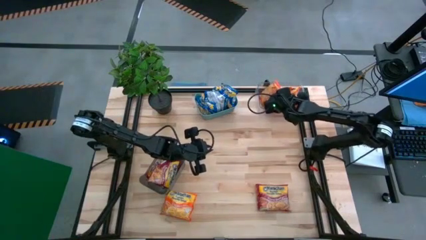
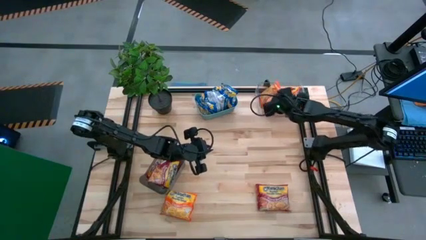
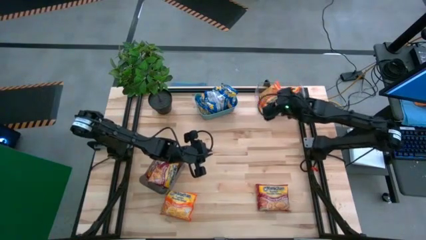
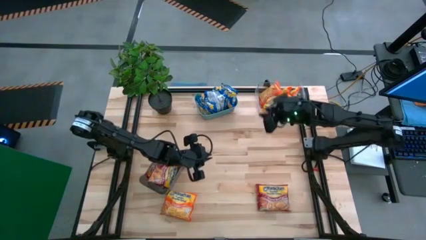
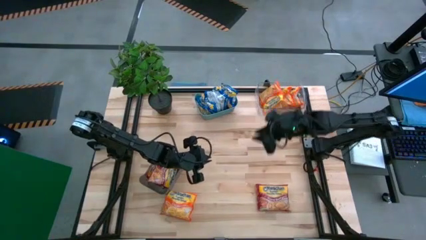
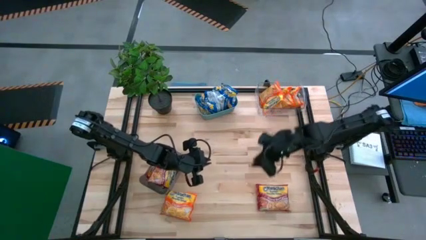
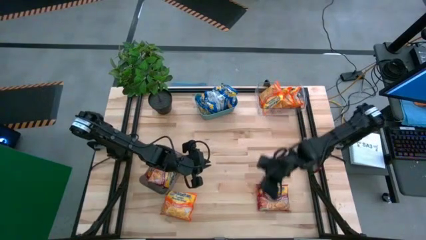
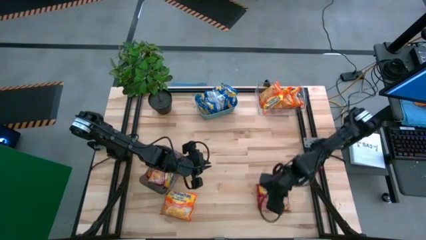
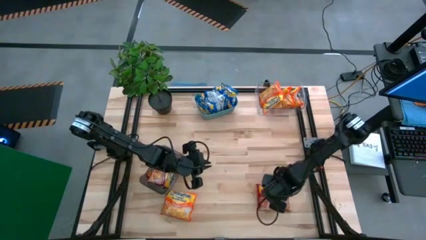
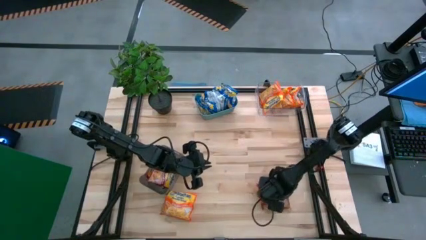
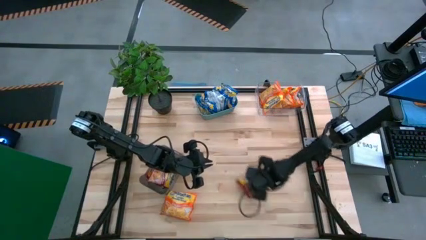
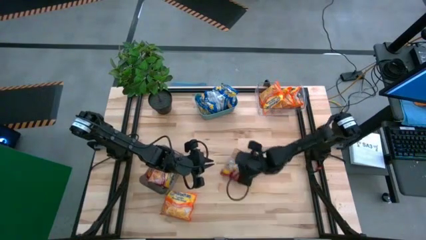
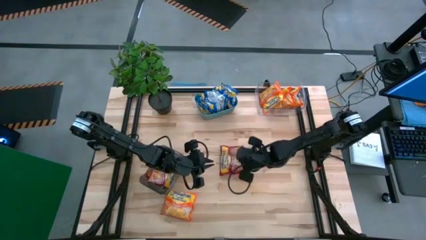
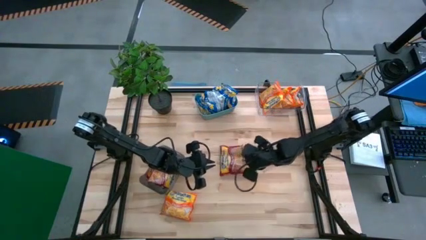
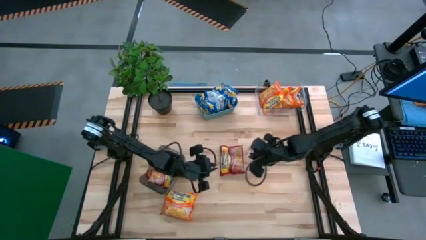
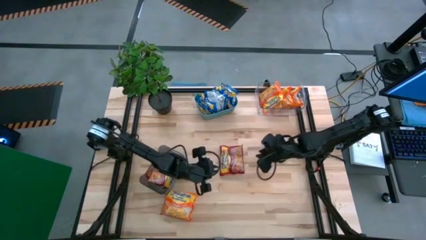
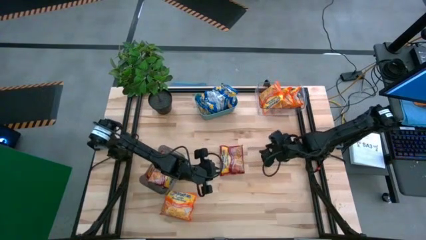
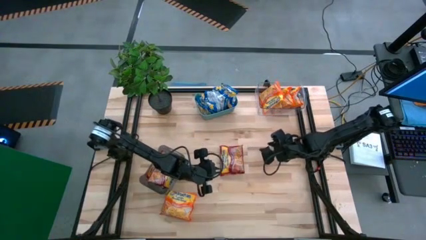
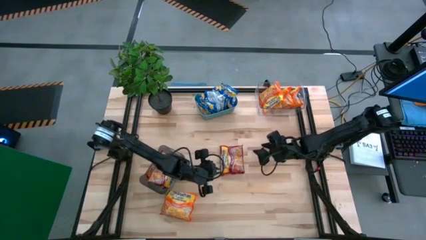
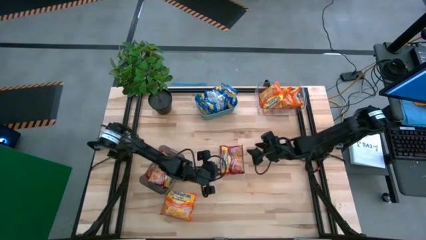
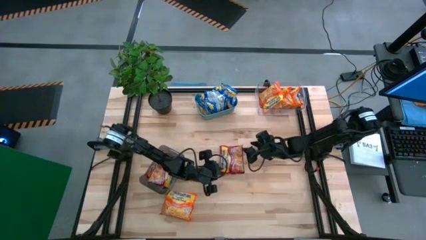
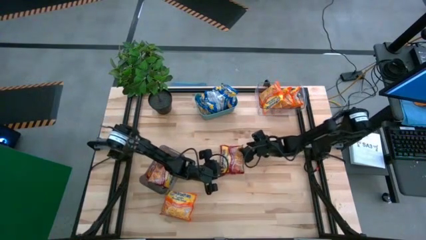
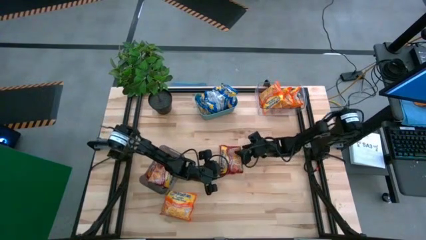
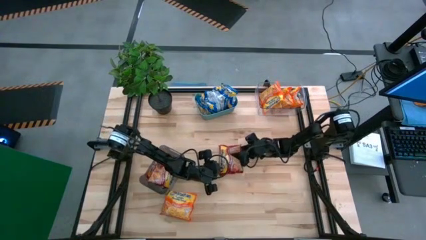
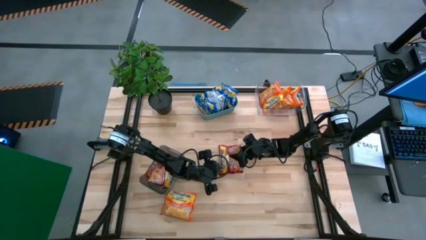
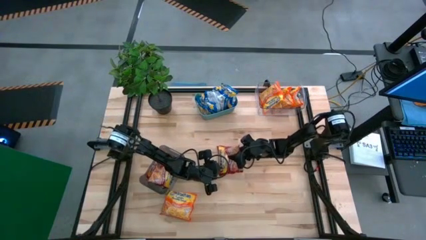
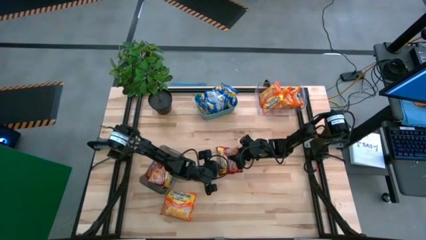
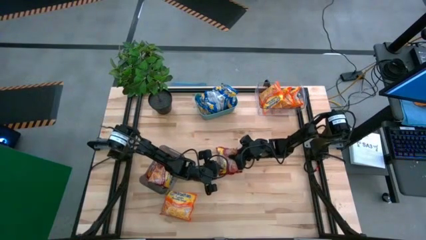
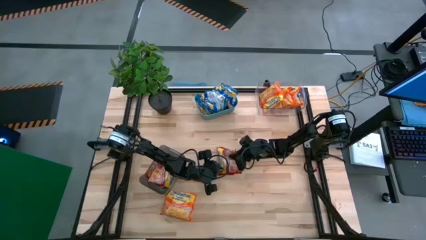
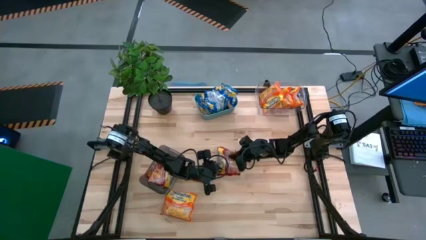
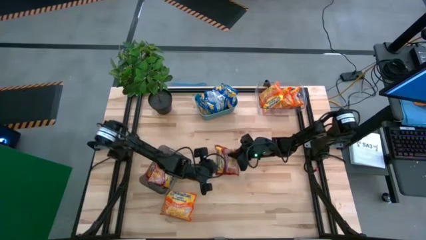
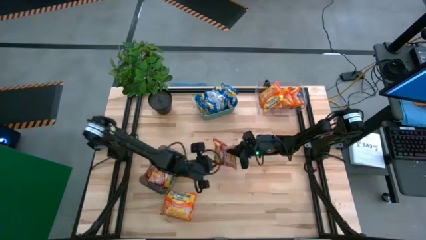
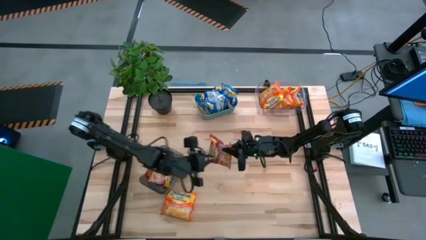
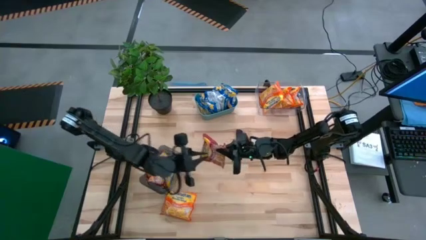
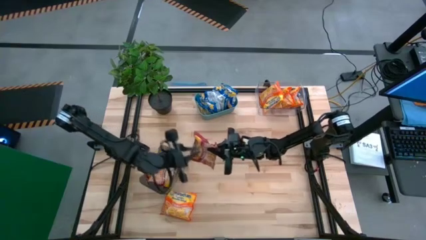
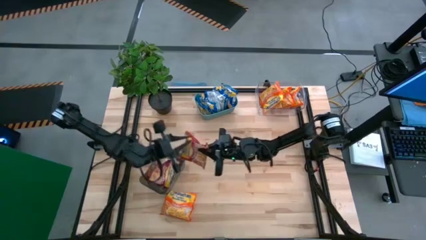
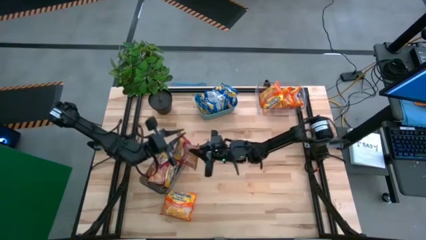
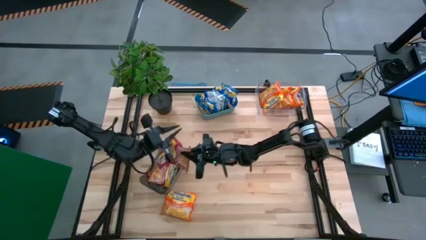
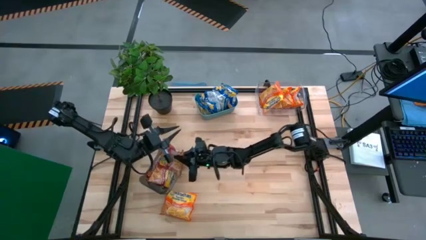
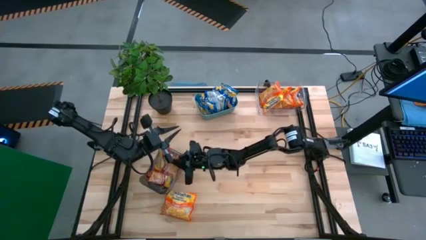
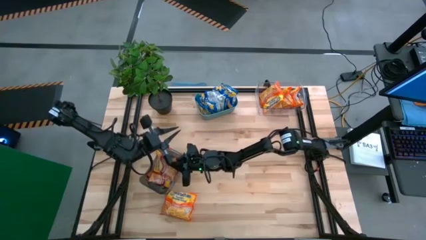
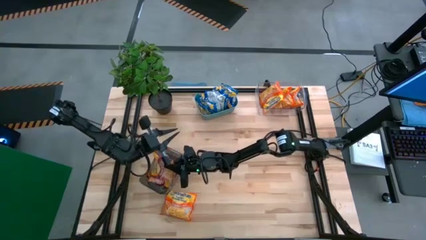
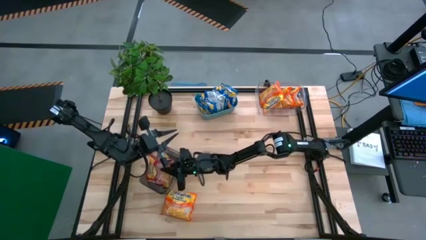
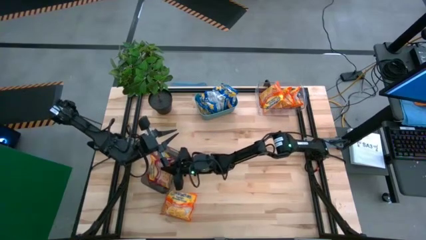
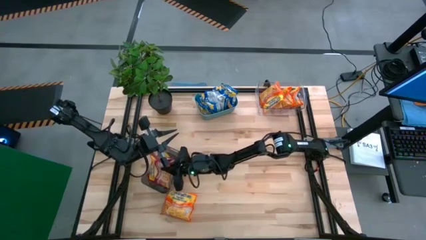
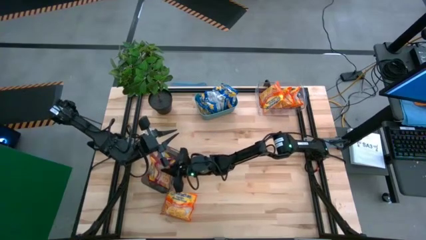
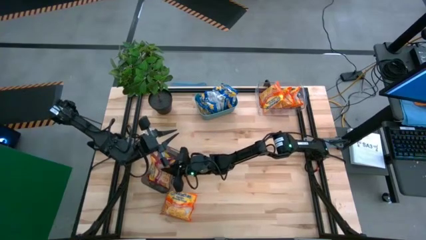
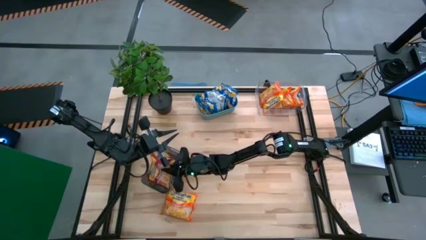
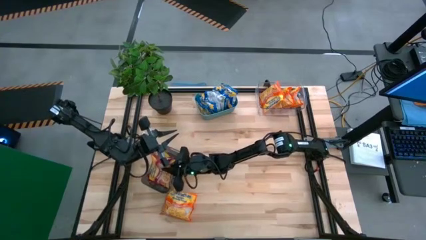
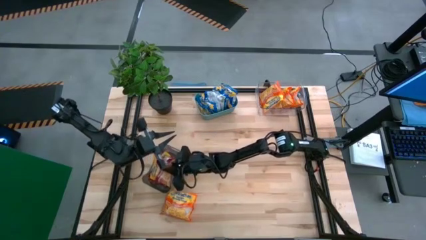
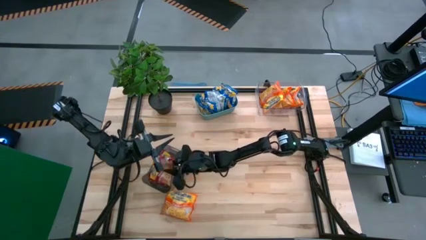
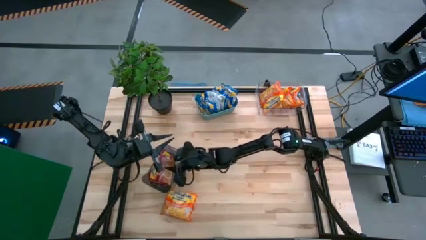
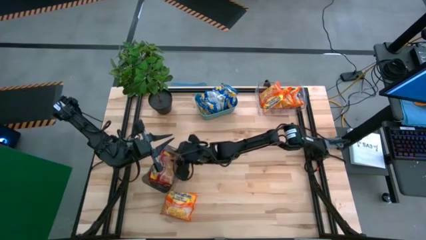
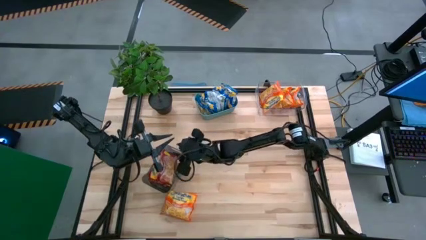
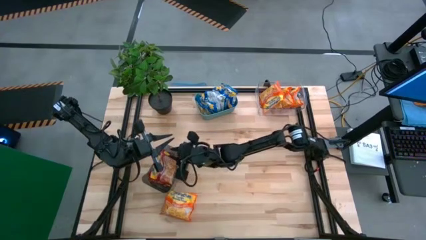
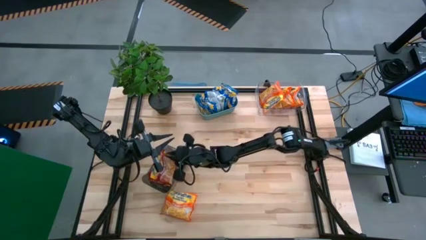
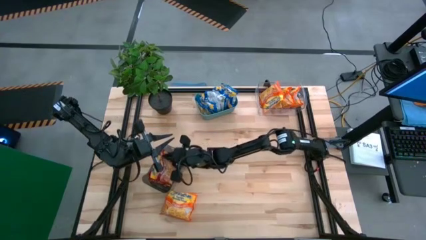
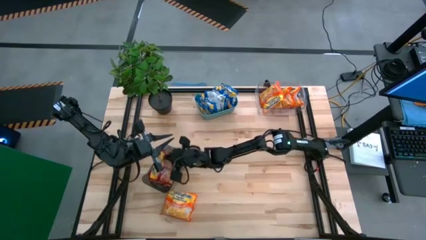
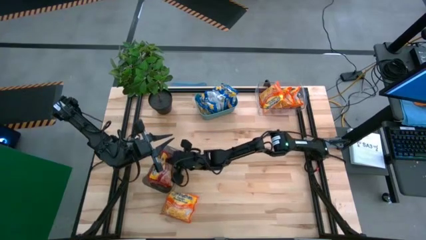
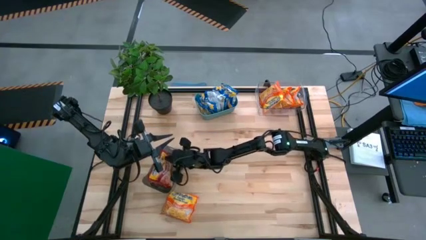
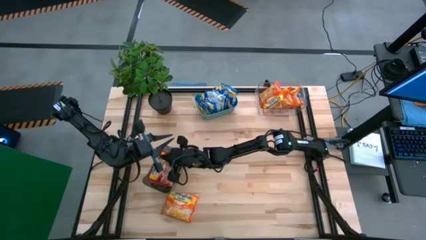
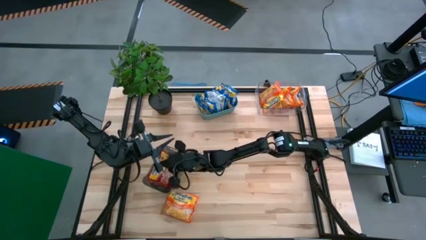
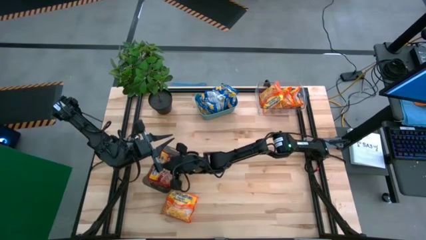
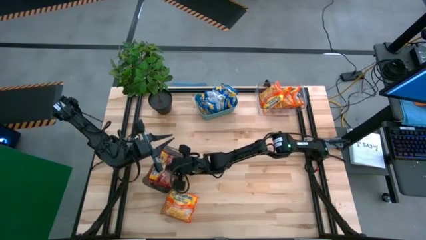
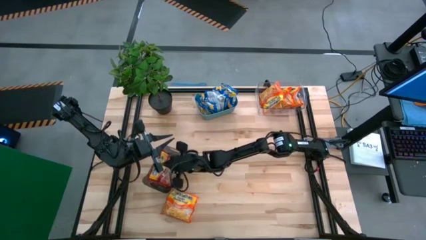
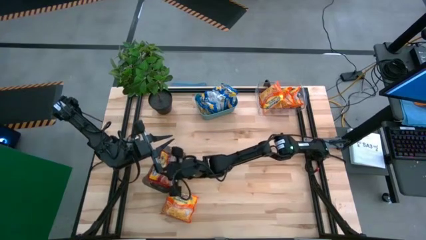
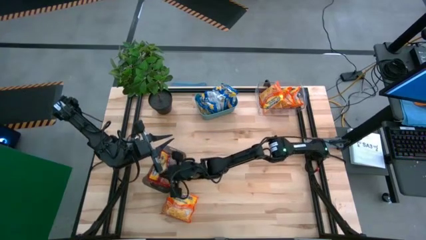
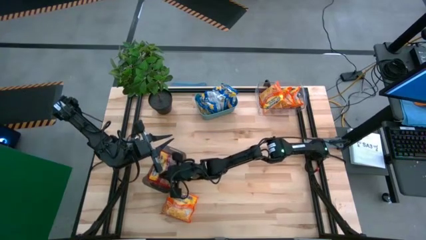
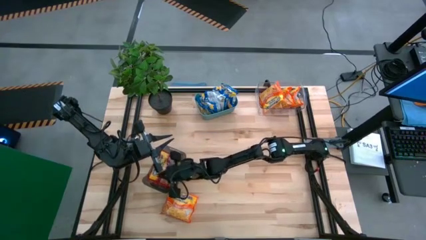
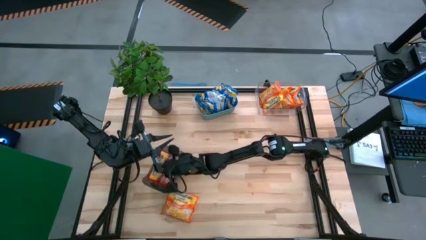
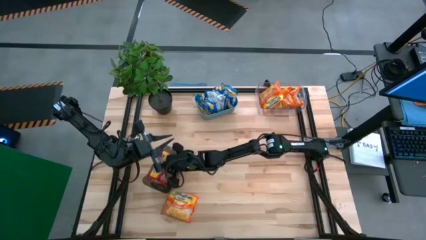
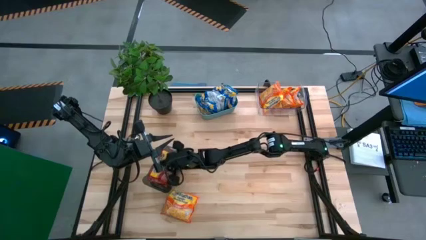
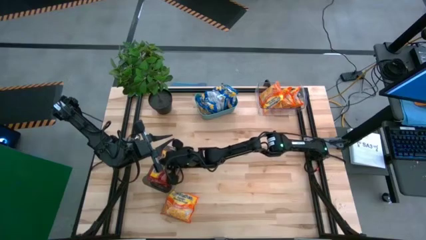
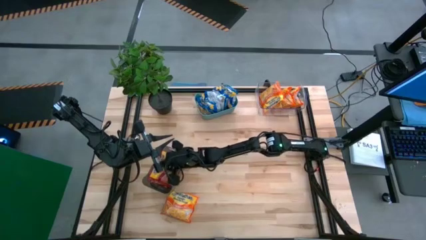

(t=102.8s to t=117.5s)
Task: Sort Maruchan noodles
Put the red noodle pack into the black bin

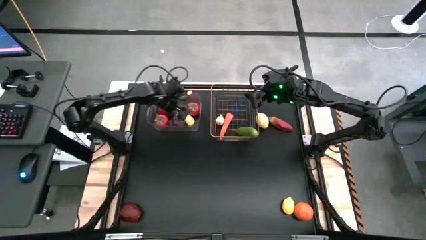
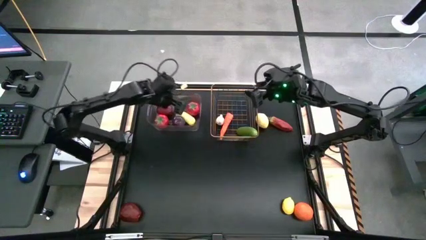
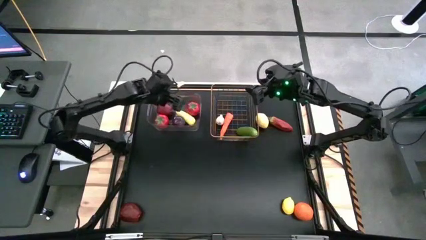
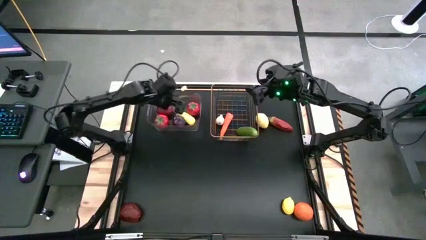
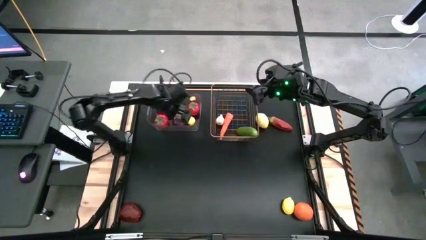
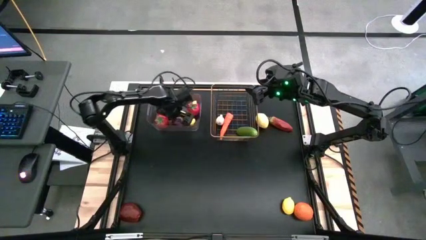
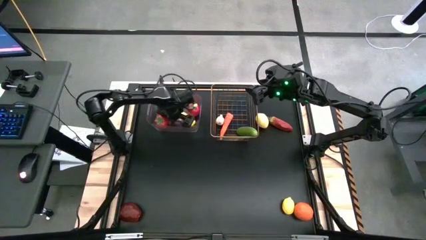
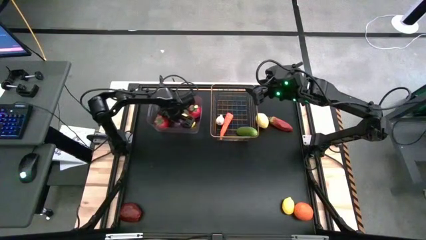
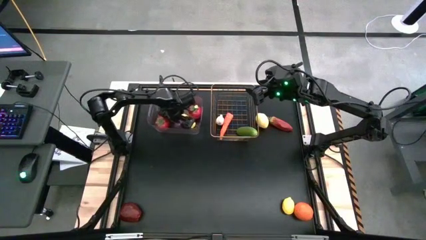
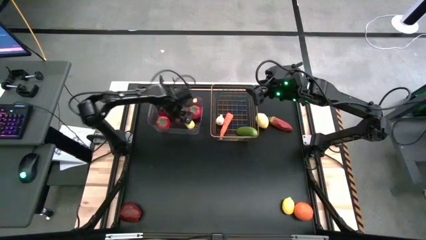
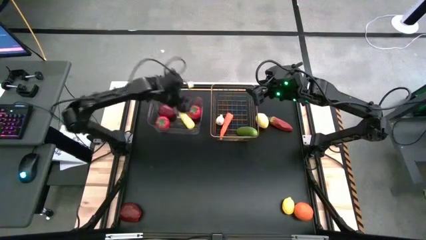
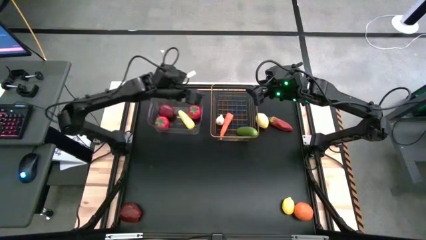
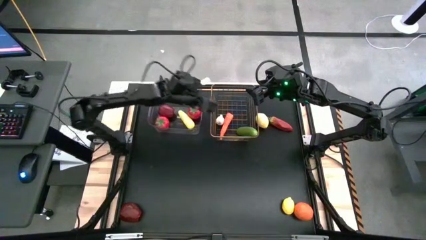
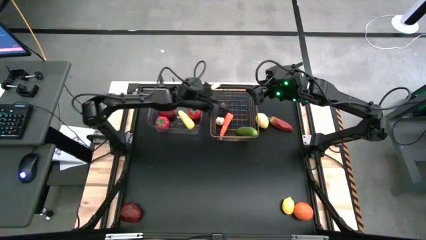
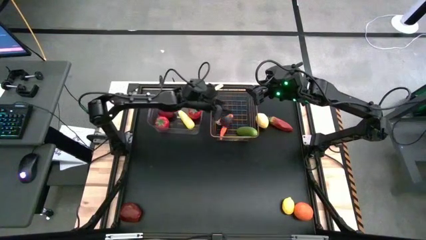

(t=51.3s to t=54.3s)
Task: Sort produce into baskets
Put the onion into the gold wire basket
